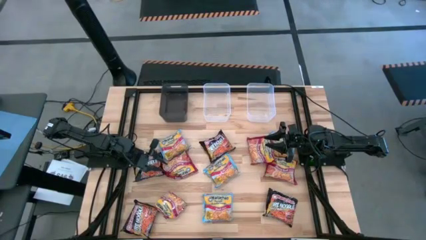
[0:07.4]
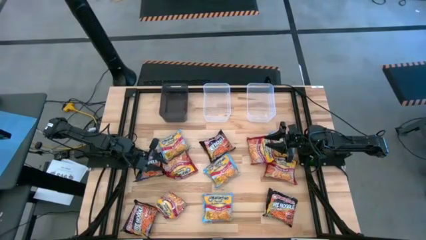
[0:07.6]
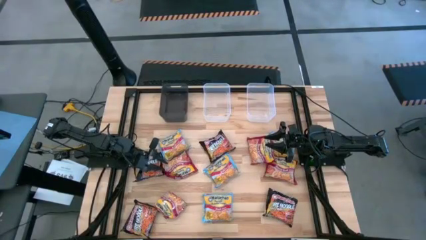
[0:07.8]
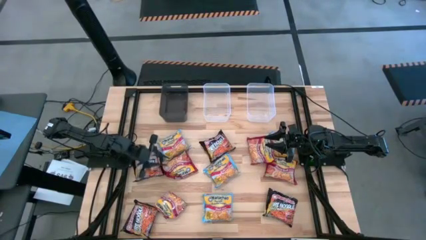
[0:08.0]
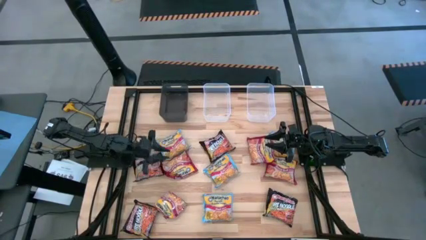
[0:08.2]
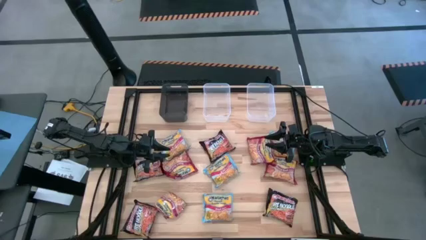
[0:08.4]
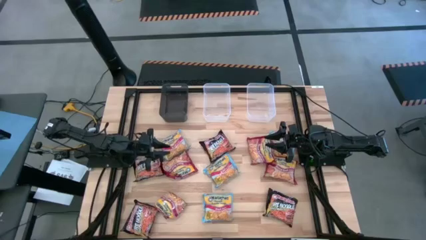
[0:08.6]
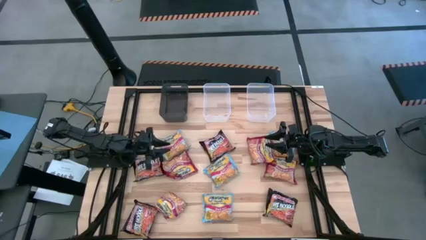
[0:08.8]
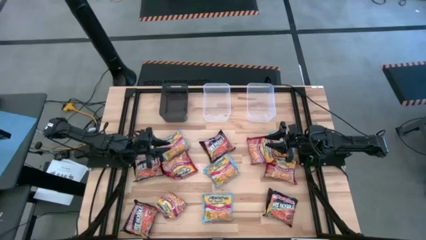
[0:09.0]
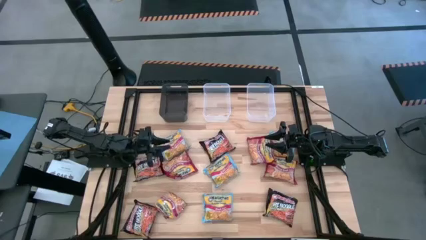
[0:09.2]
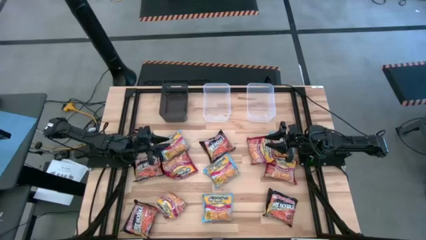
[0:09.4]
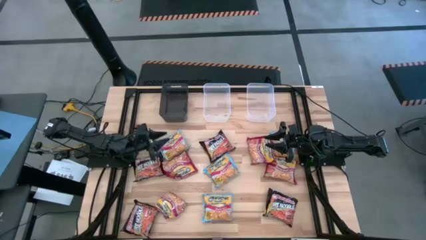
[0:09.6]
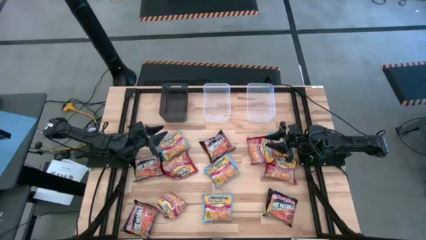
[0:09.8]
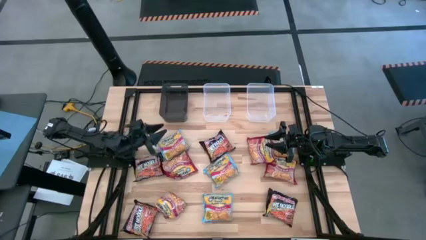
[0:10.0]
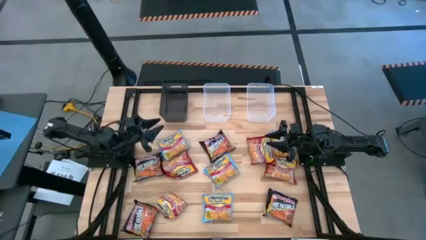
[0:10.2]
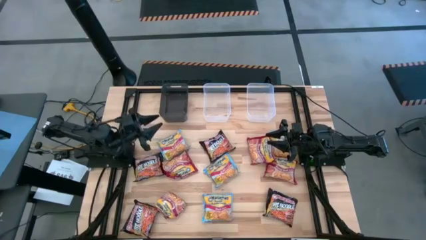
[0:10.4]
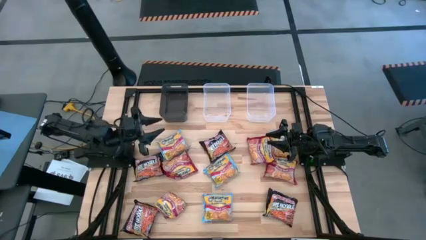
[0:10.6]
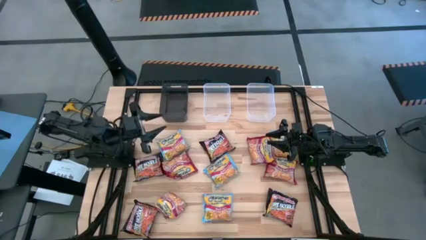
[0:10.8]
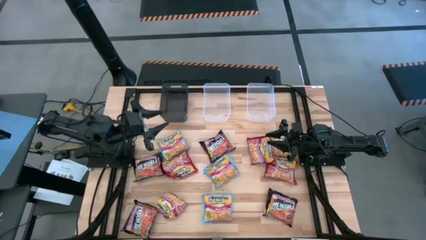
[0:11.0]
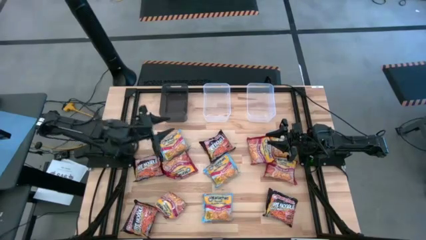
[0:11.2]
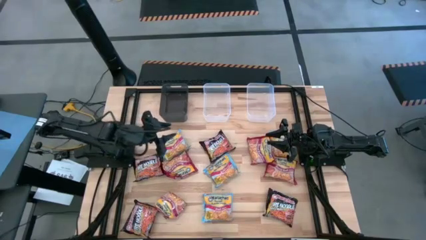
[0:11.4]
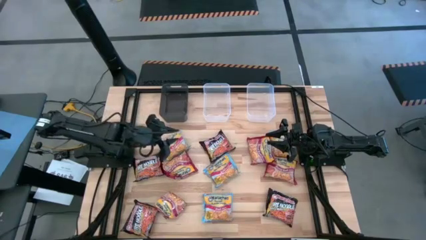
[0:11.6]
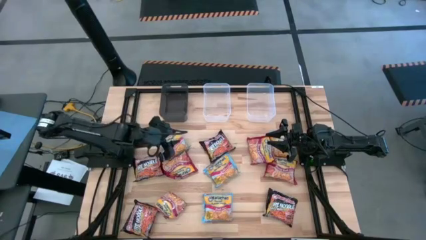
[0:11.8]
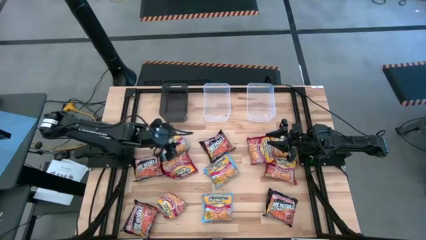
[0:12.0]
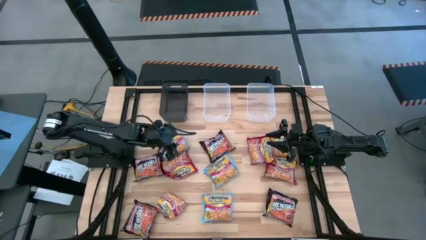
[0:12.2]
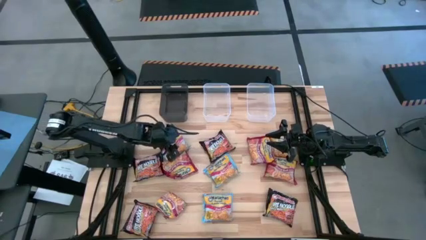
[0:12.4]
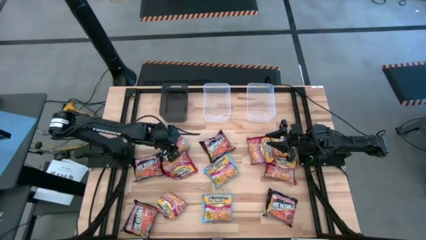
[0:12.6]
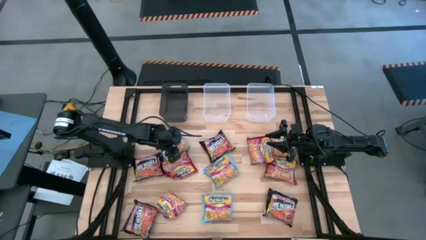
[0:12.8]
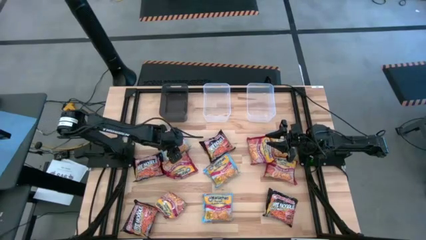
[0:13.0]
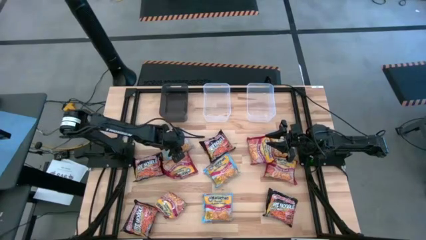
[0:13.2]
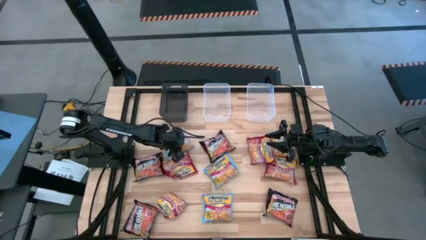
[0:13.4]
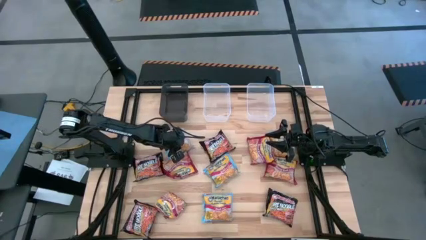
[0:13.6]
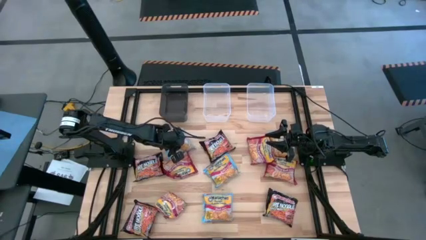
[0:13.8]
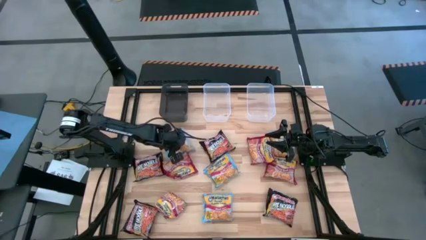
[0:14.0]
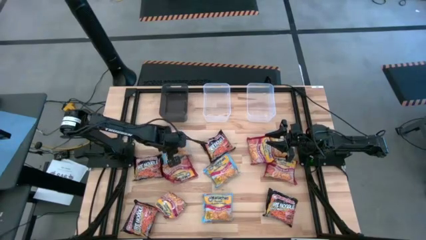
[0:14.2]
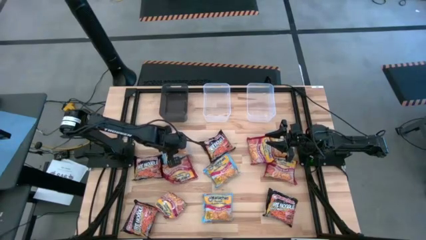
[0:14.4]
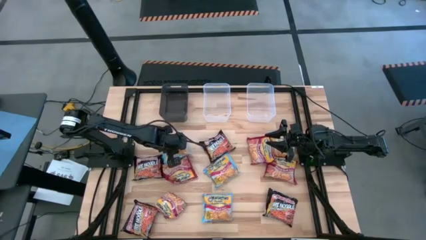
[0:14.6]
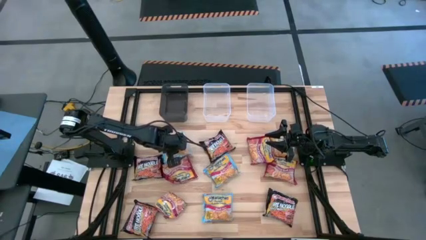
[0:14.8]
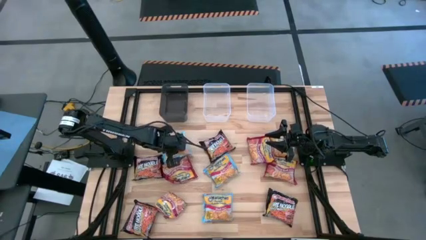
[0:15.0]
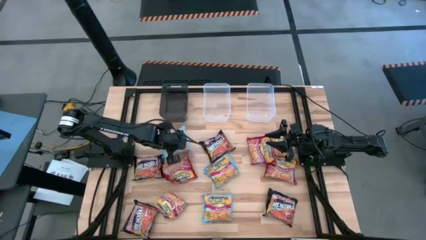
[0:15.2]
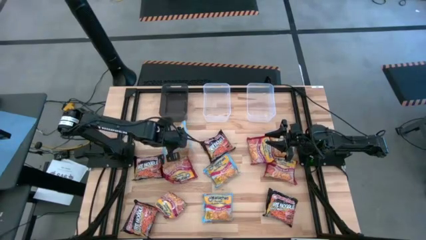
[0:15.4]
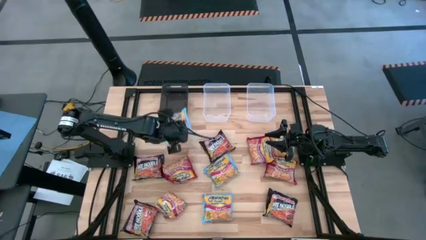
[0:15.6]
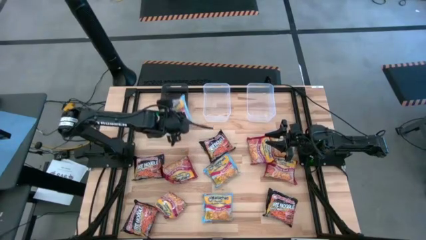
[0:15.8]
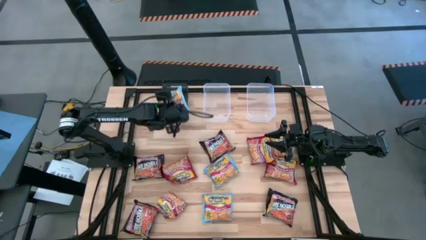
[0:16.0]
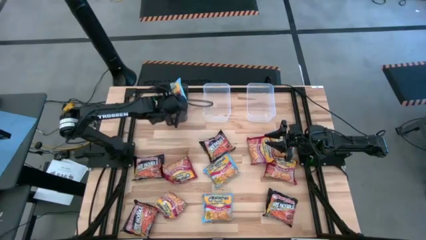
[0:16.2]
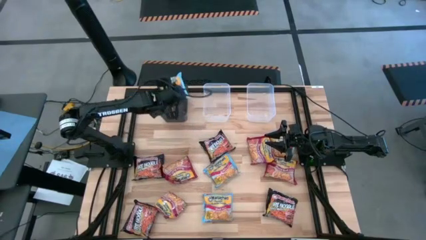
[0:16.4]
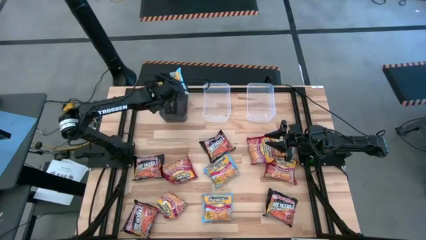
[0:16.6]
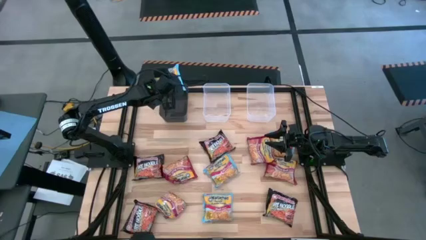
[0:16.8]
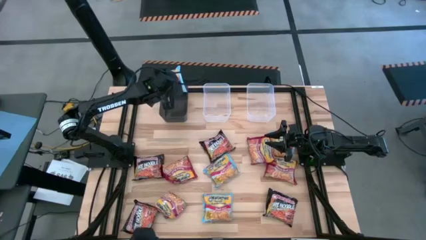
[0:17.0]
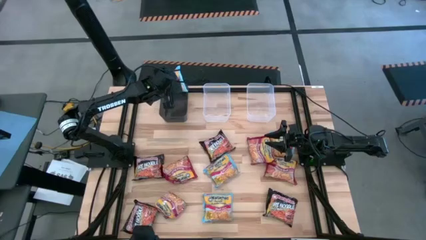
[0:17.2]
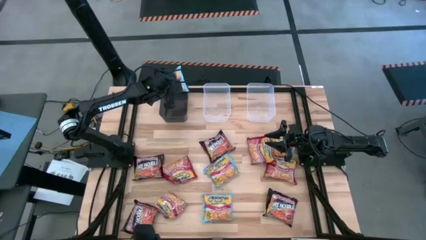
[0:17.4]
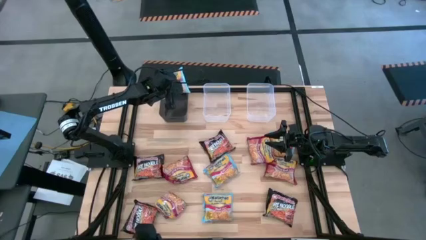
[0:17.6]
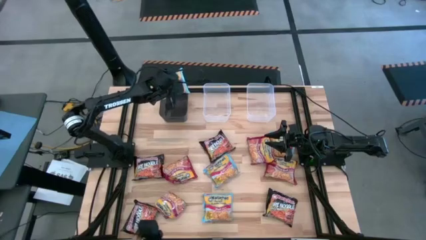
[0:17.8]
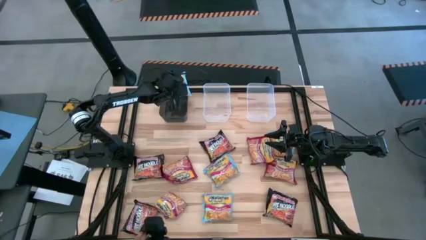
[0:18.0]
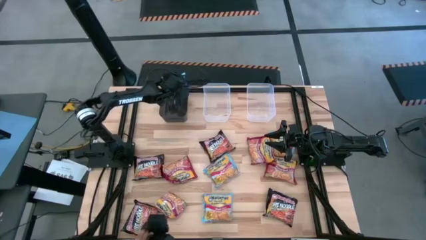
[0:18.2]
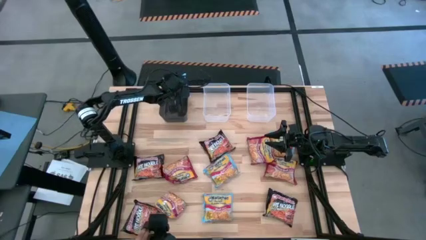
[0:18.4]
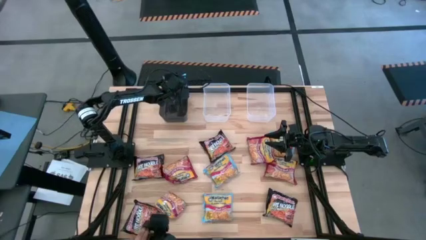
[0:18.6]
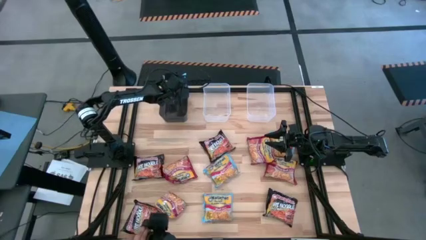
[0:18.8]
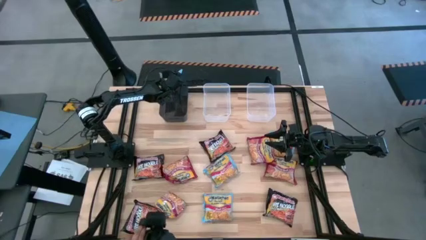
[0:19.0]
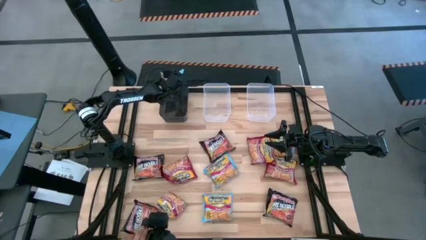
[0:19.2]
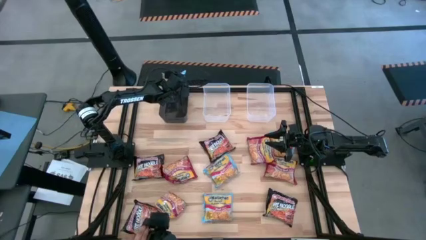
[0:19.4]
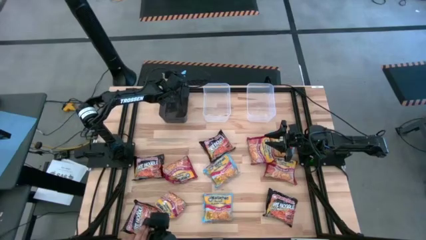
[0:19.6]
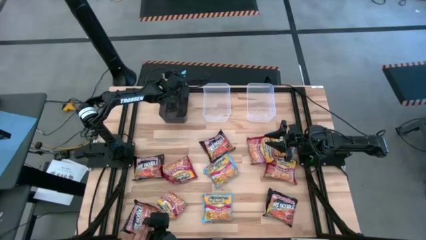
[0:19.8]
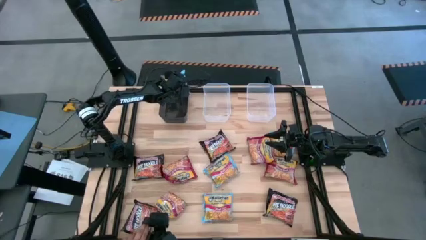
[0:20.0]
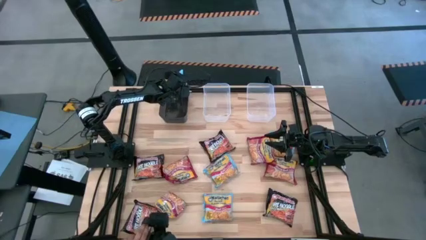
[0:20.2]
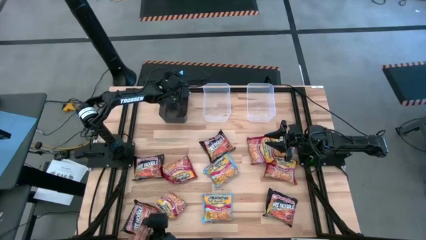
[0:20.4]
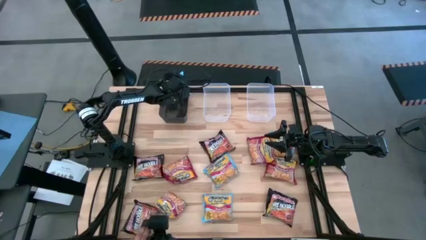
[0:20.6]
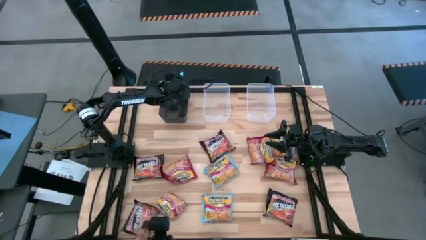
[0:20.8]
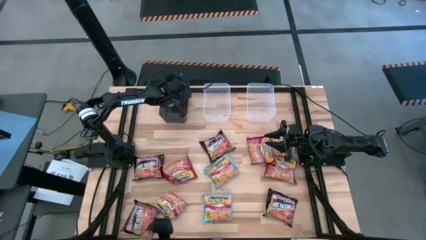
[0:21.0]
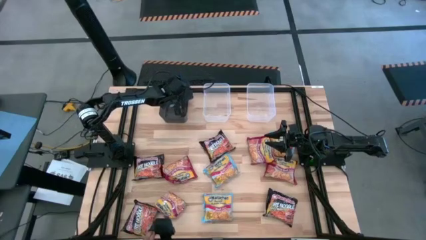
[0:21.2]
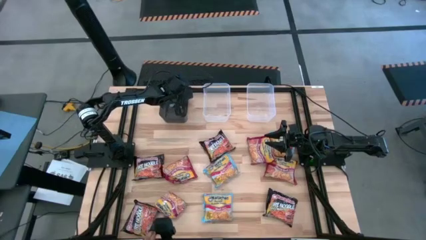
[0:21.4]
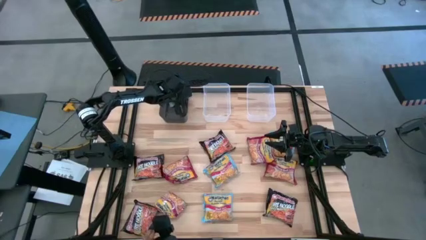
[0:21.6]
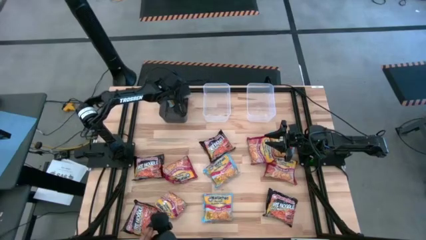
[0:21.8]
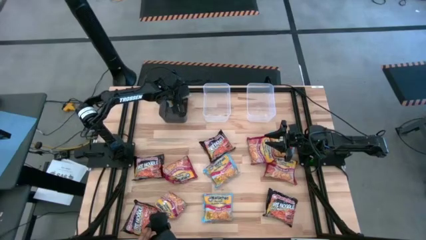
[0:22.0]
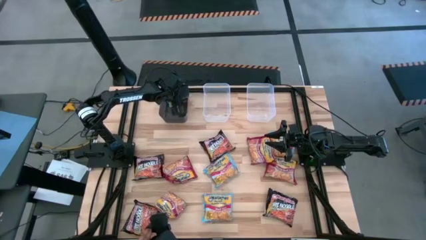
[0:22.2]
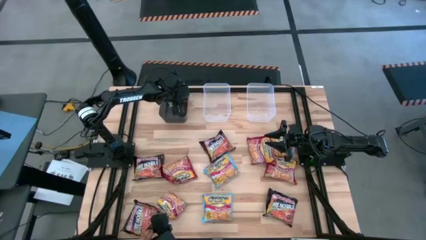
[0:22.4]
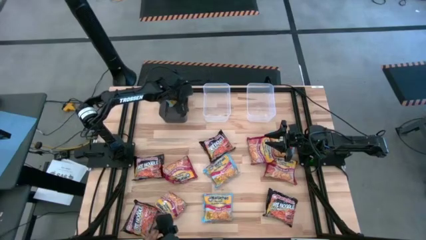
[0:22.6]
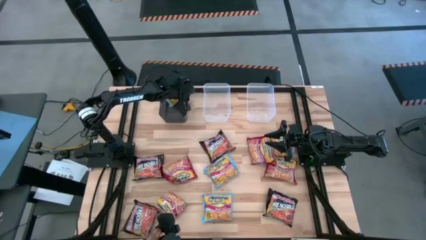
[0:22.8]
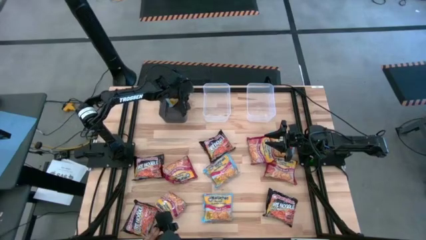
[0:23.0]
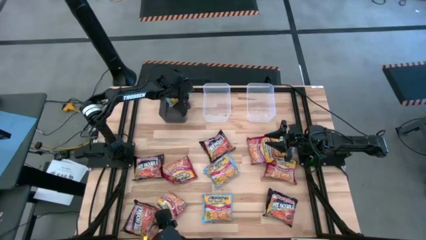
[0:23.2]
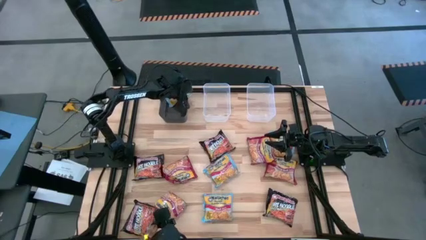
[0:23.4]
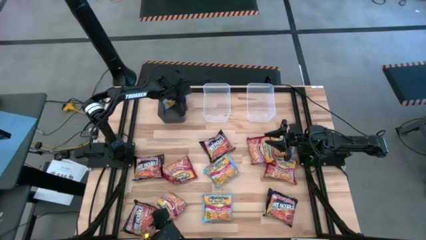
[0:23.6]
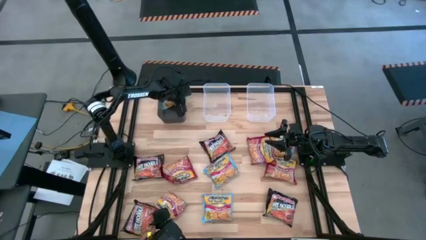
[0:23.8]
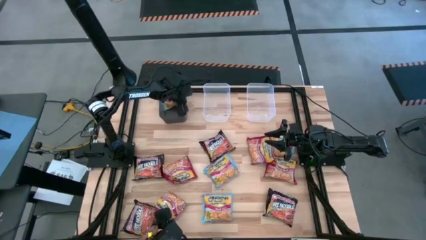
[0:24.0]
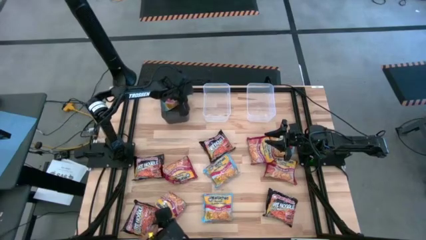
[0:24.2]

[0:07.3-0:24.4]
Task: Sort Maruchan noodles
Put the blue noodle pack into the black bin
